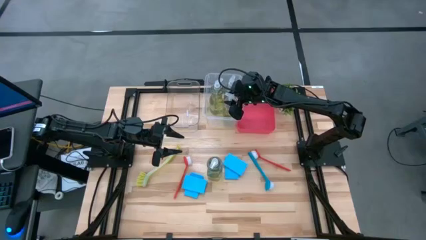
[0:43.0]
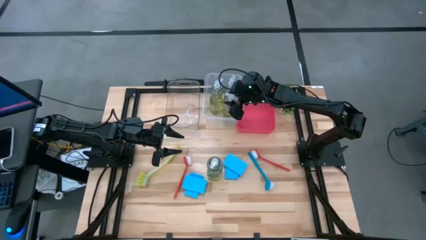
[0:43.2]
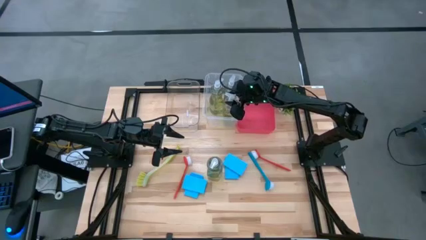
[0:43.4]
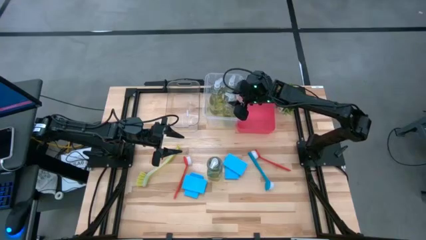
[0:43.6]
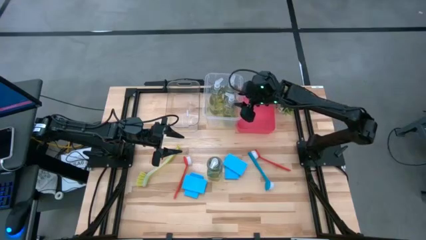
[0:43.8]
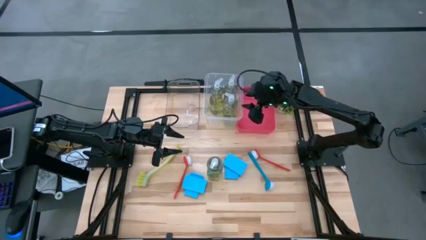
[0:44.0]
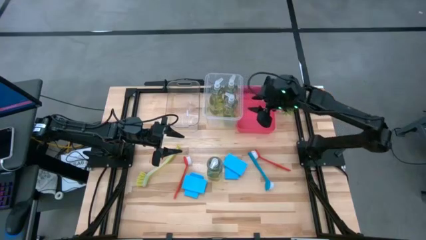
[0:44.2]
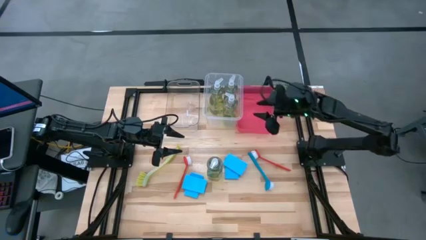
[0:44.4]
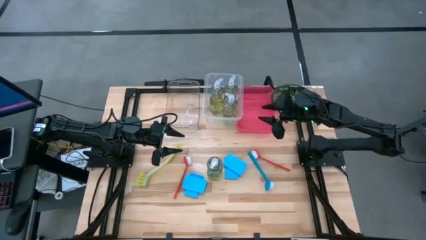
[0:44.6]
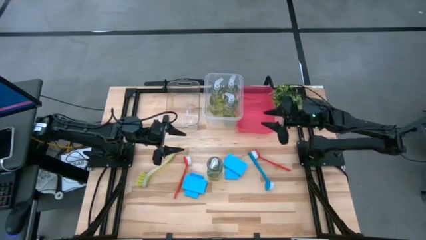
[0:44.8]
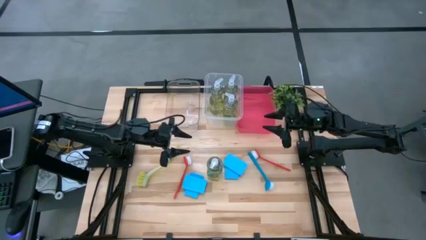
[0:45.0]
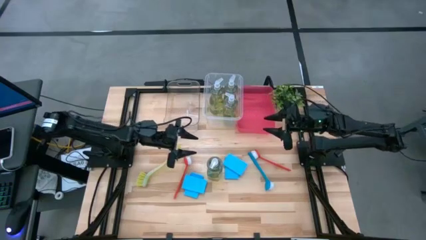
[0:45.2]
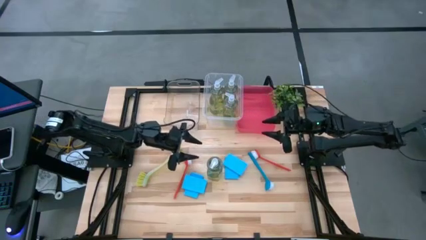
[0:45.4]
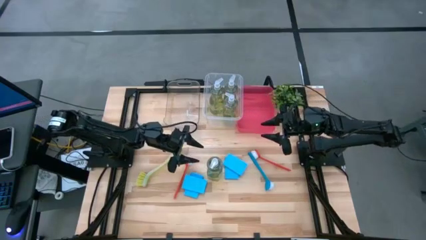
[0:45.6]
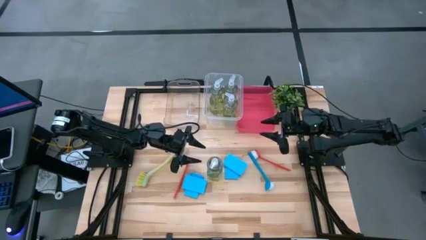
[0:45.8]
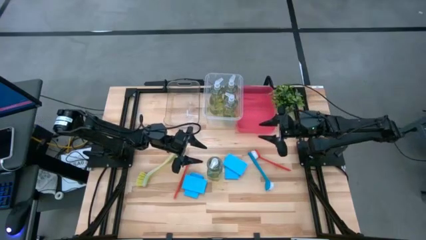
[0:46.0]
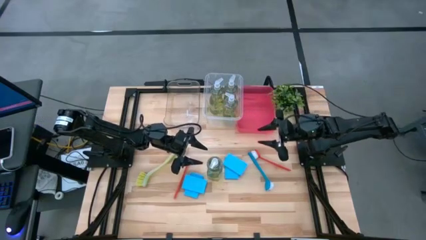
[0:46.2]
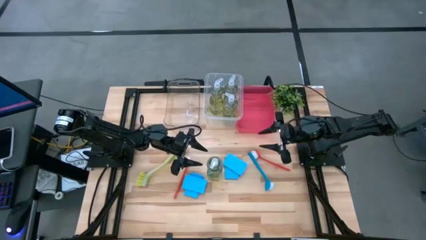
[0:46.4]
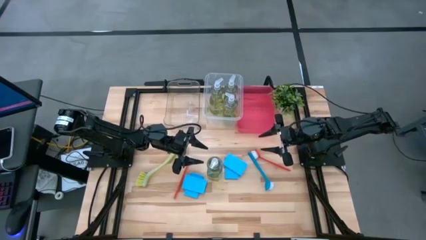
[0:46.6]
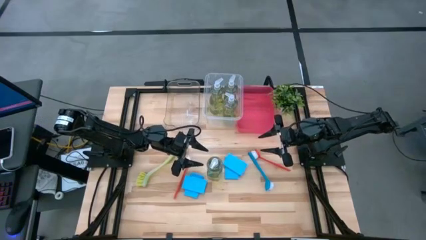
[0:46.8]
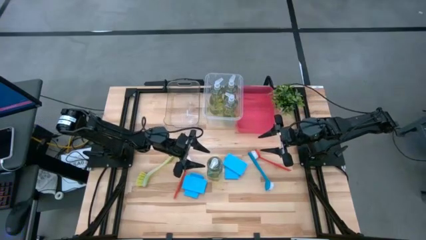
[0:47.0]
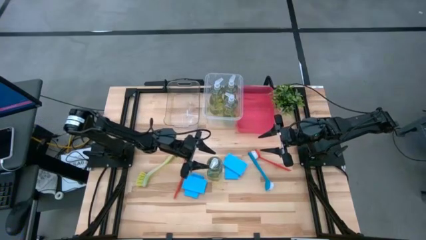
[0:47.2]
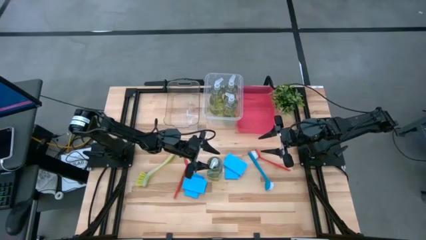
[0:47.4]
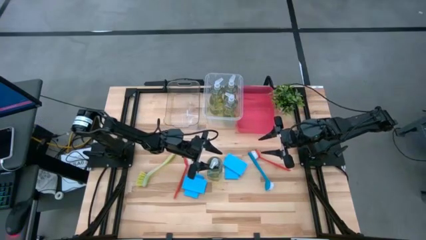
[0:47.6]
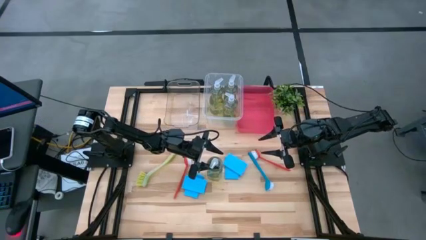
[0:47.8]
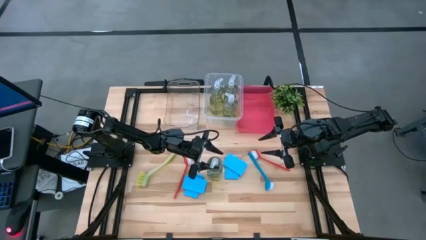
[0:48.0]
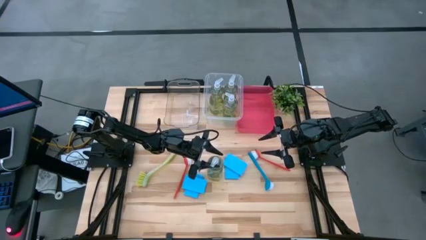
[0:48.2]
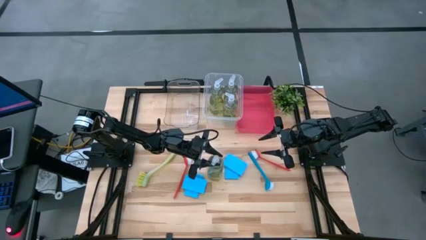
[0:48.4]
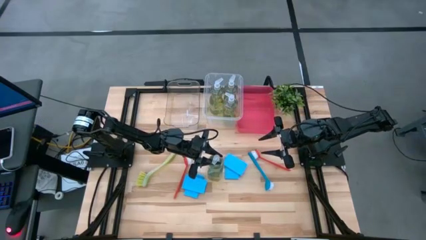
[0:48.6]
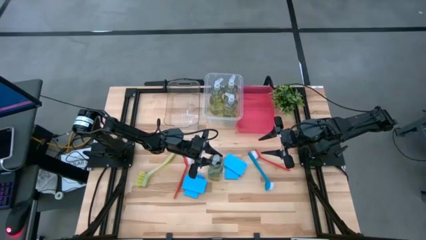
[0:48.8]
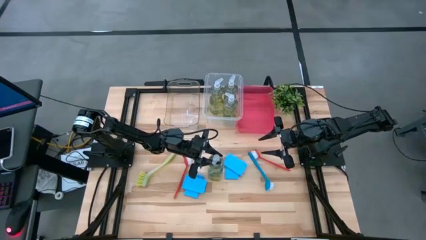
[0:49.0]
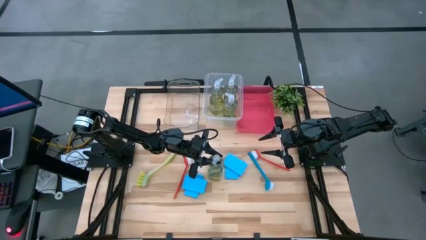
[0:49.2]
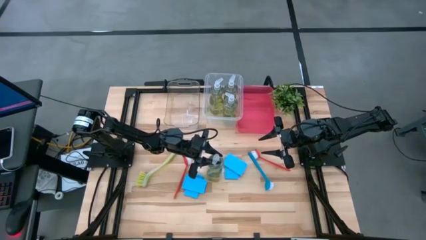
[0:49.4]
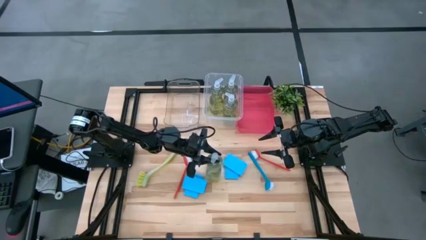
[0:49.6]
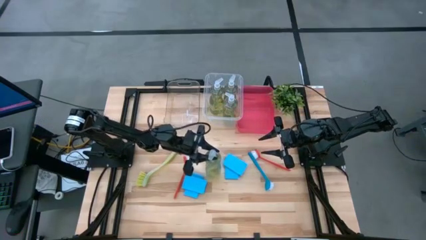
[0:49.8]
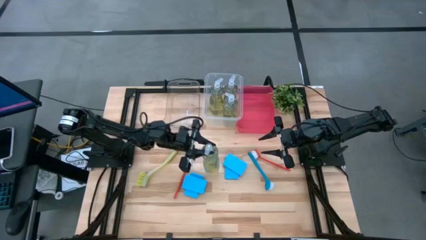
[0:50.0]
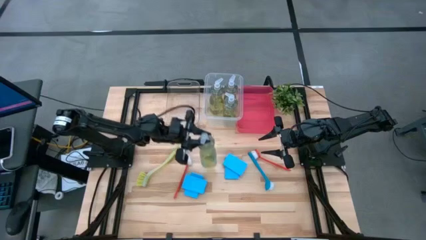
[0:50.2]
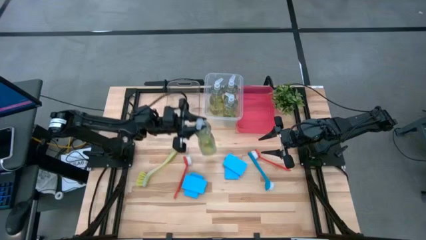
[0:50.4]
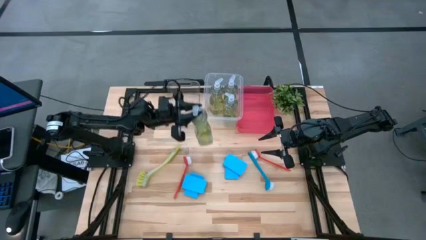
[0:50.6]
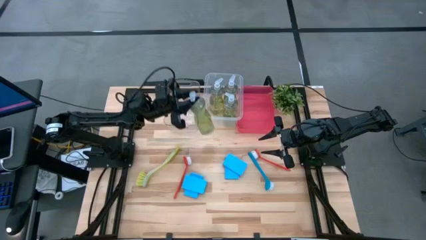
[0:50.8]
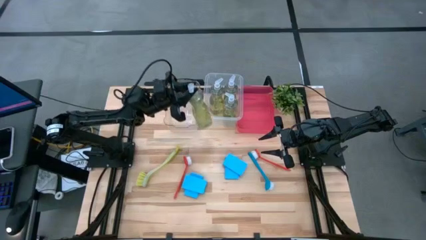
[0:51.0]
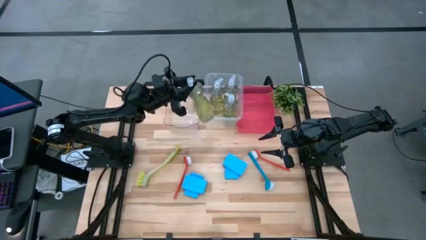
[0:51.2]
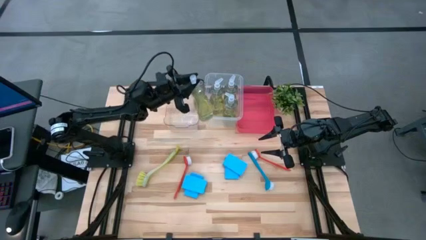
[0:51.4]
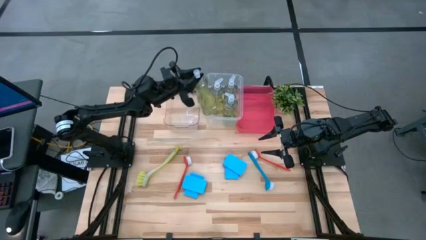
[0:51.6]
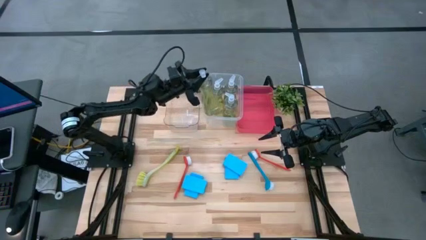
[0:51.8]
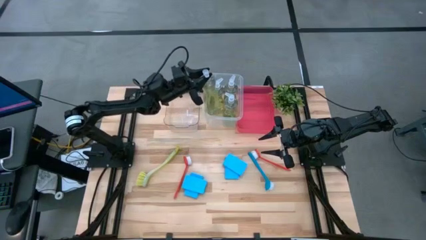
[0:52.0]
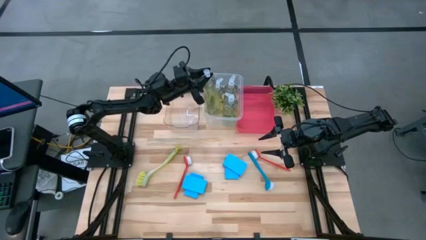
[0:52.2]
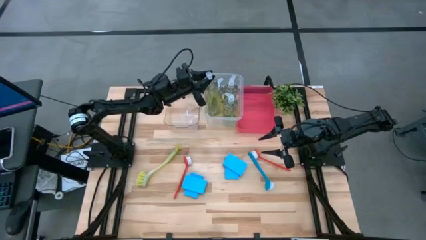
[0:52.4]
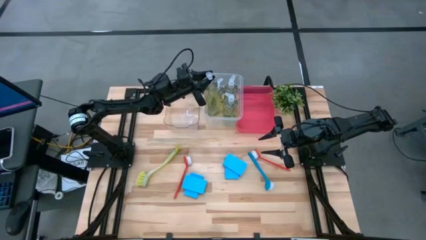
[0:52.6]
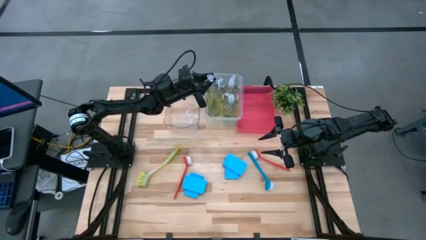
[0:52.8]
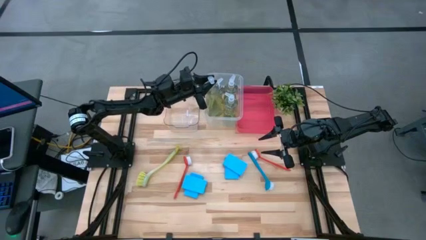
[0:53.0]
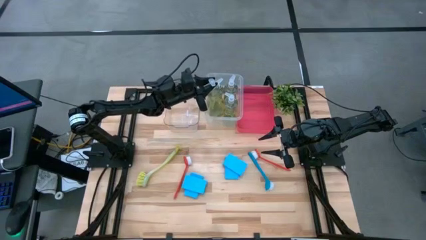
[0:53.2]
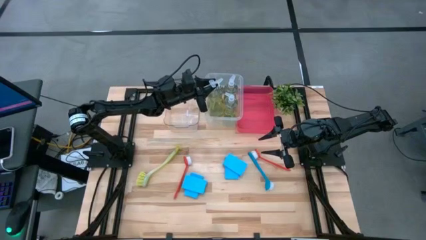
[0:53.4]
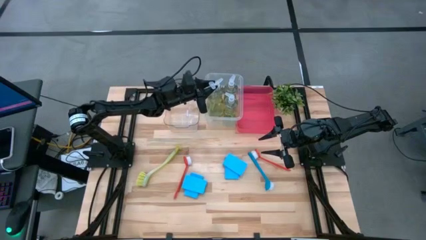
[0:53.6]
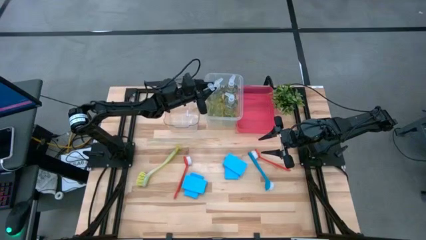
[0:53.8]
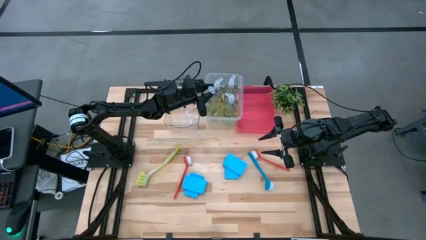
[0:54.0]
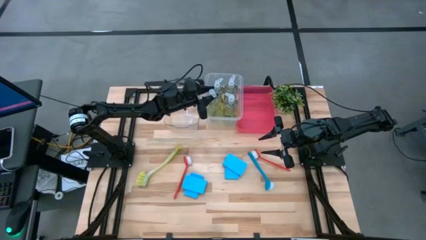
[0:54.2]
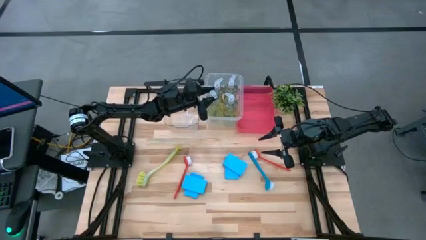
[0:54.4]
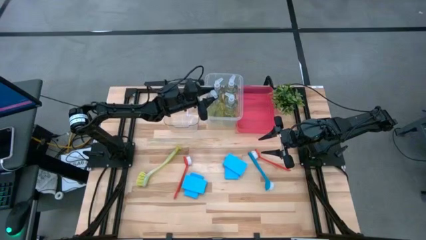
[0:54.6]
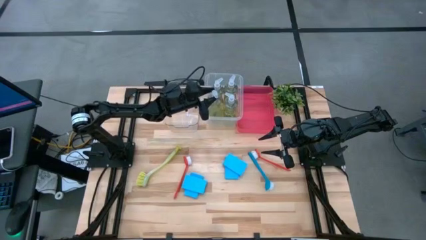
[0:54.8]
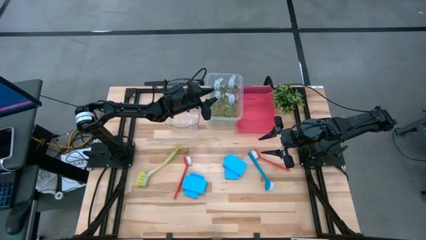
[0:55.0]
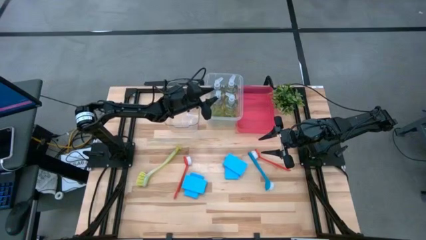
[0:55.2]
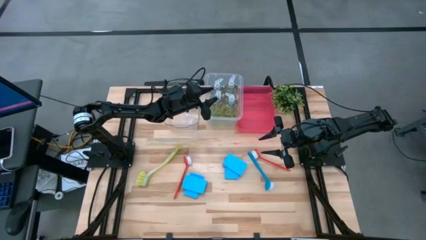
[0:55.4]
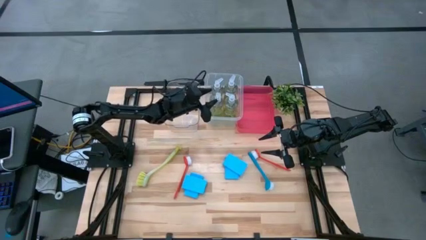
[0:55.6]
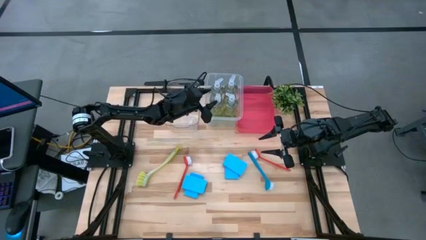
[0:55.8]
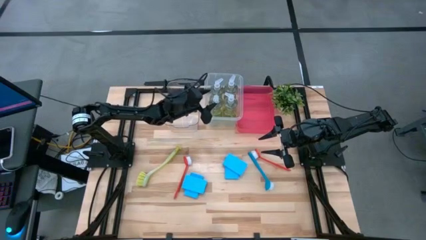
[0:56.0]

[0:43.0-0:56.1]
Task: Pick & Place Kitchen Sink Supplies
Put the green dish soap into the white bin

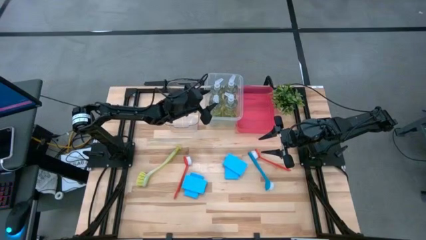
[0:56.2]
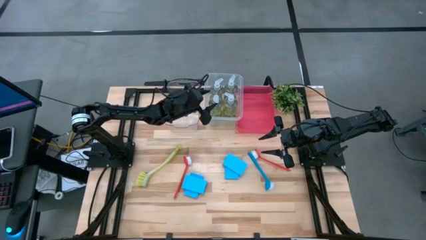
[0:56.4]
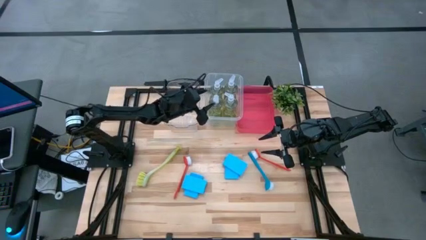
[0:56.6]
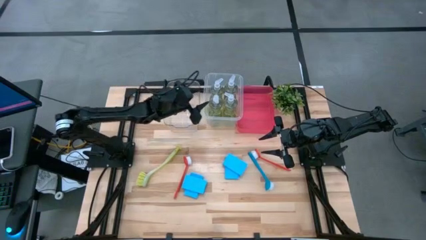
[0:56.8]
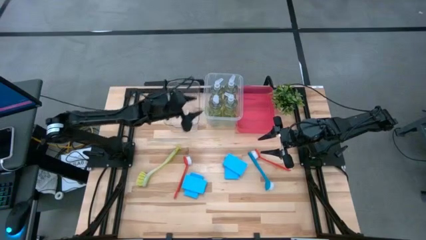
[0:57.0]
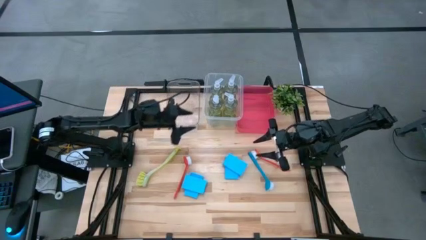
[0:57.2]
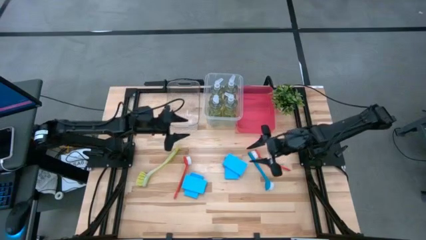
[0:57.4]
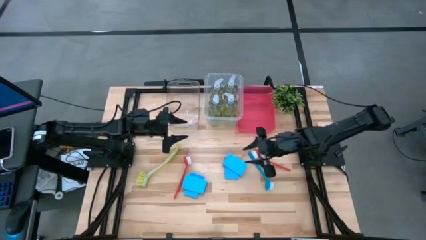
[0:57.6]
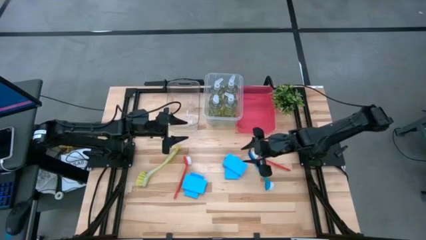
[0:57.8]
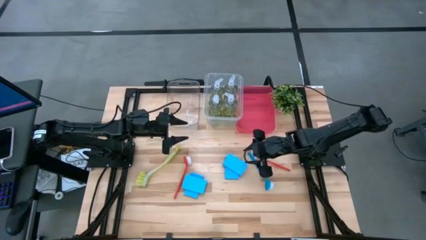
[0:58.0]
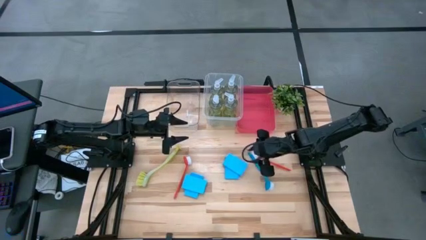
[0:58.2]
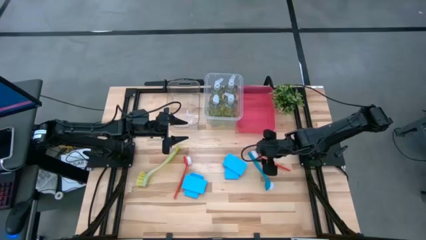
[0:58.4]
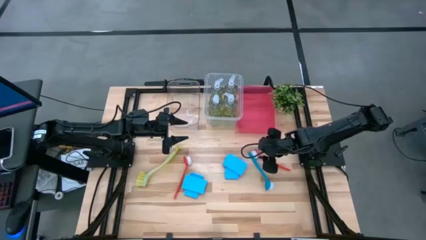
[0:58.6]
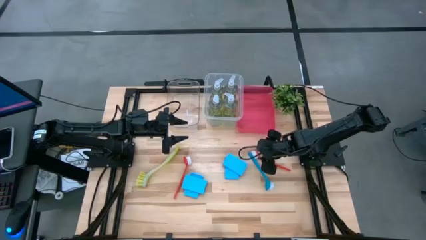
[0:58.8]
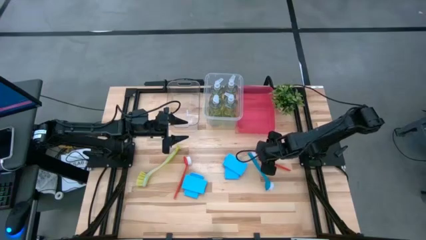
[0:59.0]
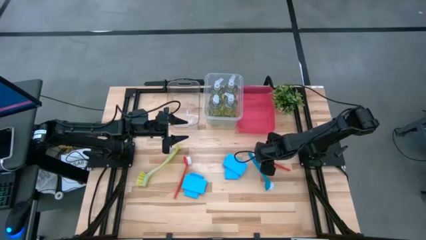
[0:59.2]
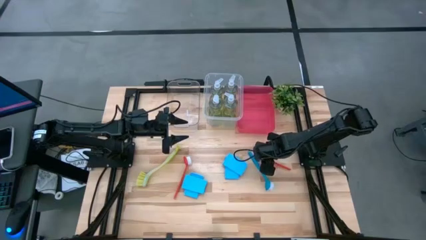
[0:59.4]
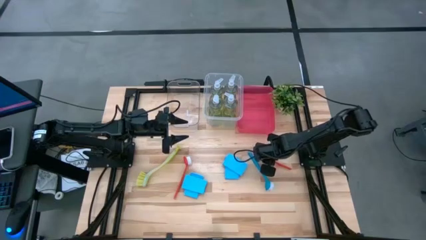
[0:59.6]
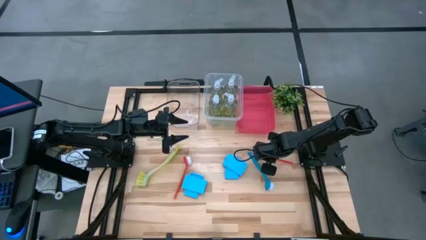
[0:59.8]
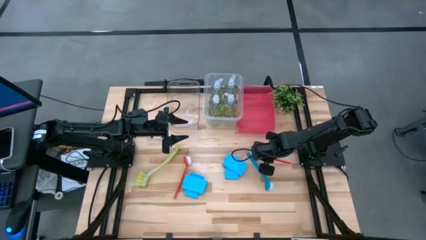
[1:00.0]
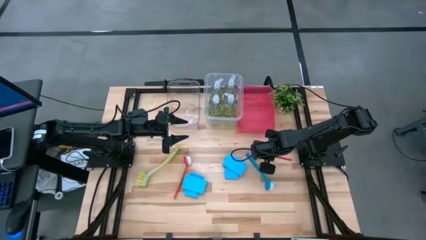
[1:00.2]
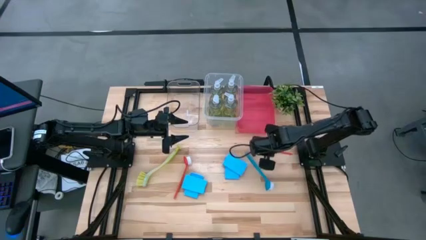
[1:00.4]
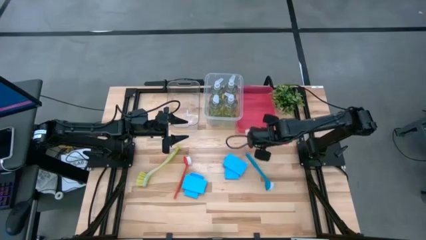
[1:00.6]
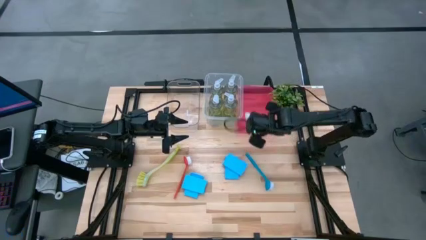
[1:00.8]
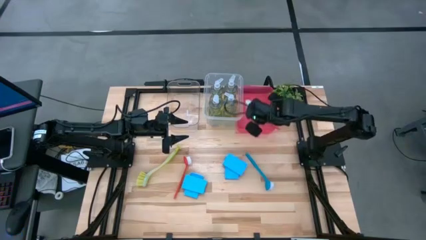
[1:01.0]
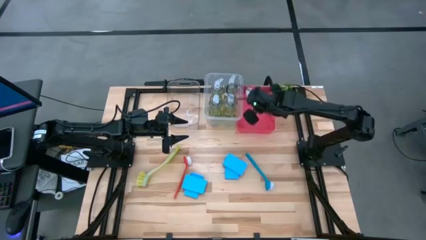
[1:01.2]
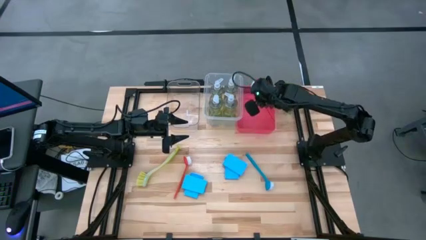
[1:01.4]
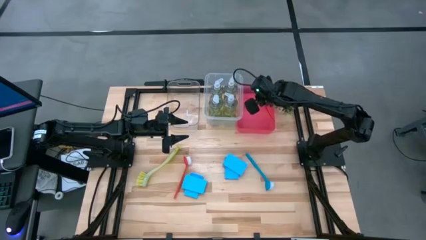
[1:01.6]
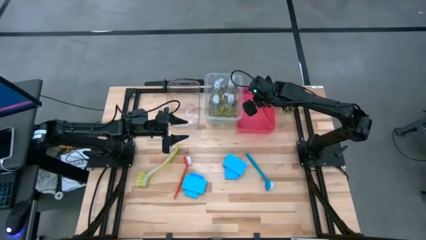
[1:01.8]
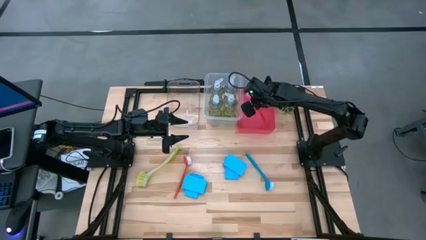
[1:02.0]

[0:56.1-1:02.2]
Put the red dish brush into the pink bin
